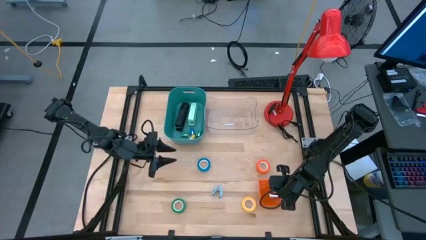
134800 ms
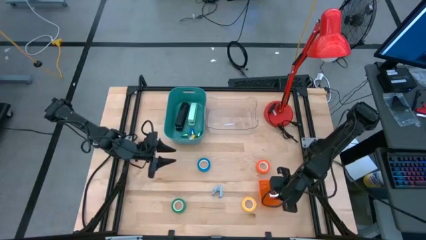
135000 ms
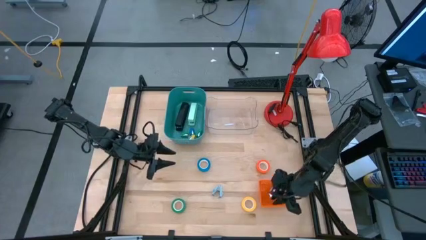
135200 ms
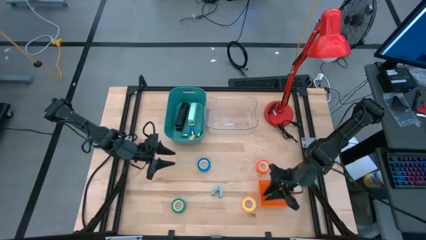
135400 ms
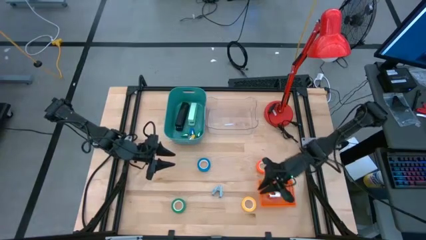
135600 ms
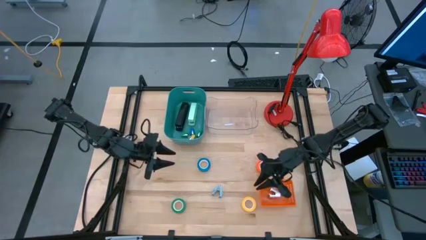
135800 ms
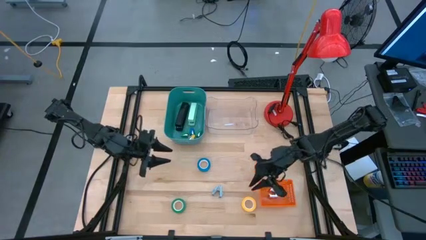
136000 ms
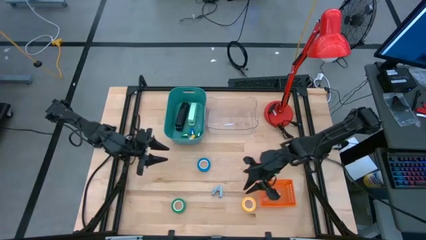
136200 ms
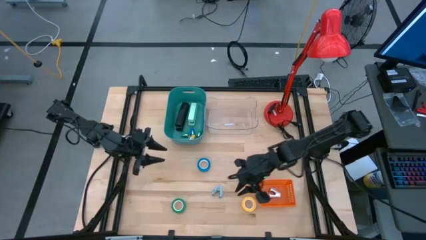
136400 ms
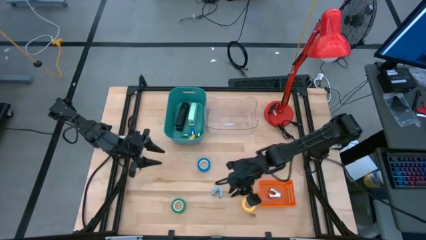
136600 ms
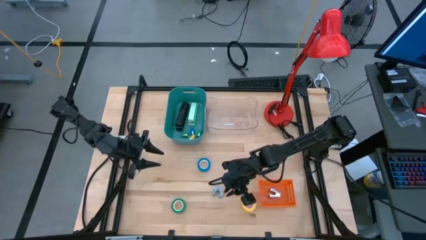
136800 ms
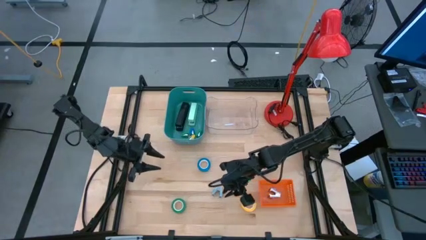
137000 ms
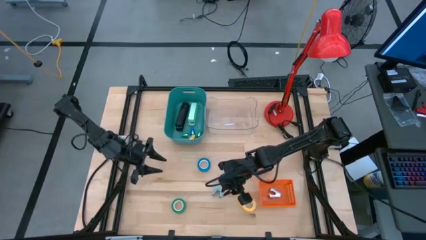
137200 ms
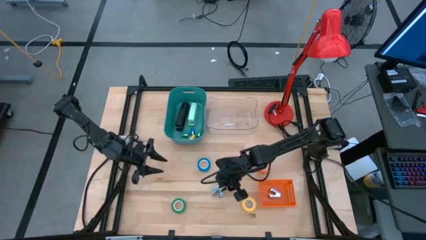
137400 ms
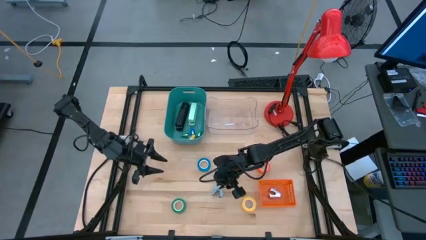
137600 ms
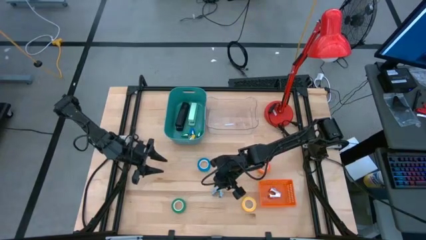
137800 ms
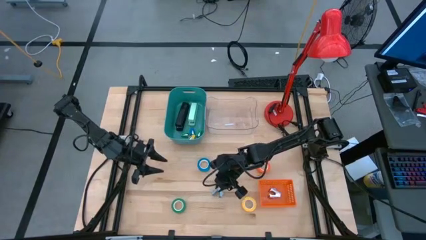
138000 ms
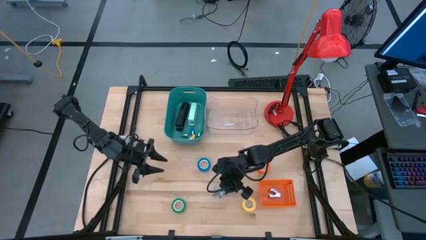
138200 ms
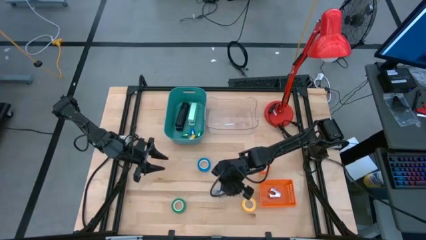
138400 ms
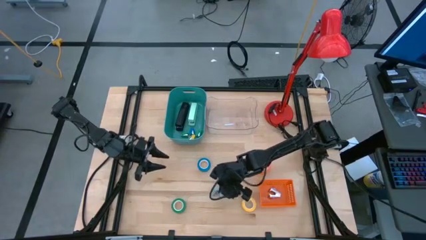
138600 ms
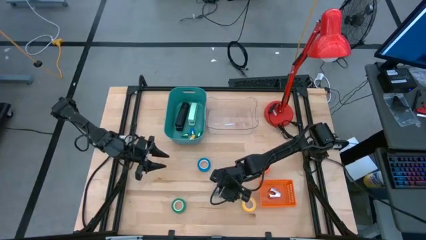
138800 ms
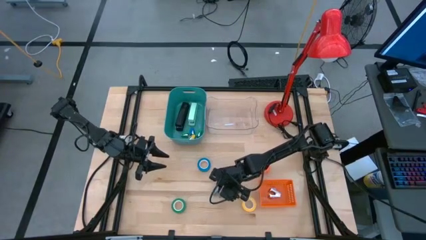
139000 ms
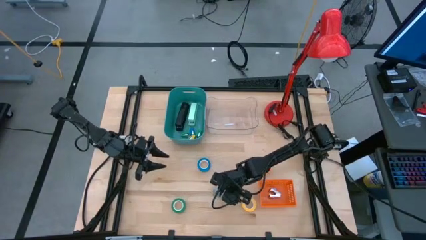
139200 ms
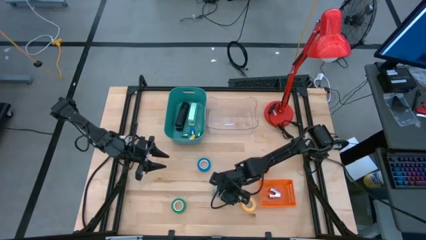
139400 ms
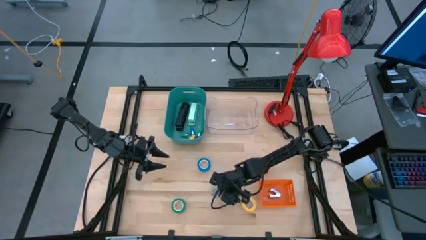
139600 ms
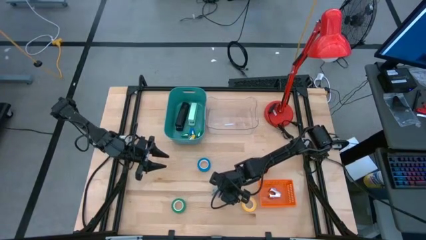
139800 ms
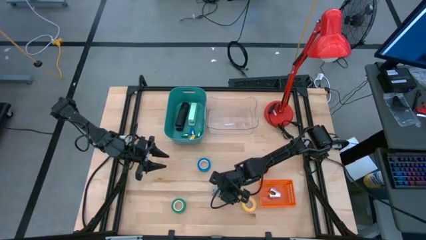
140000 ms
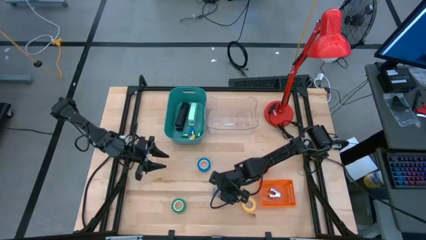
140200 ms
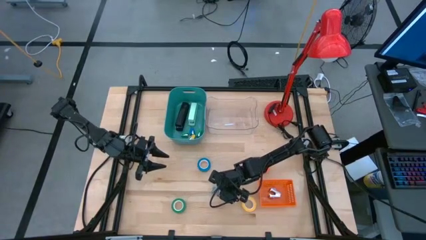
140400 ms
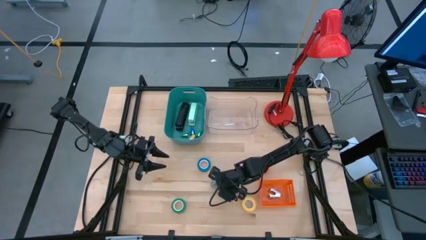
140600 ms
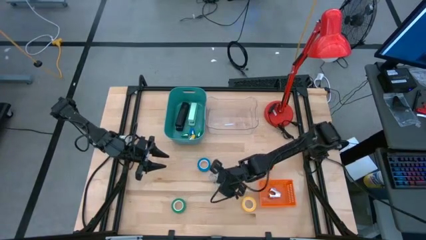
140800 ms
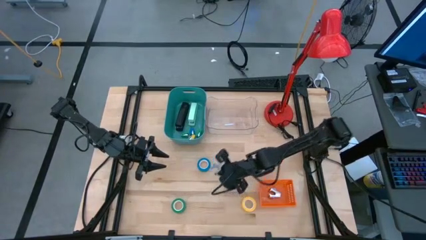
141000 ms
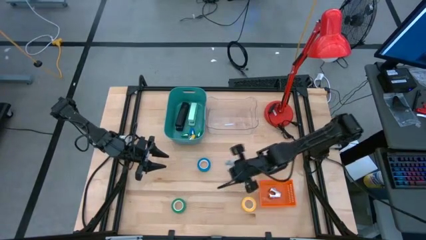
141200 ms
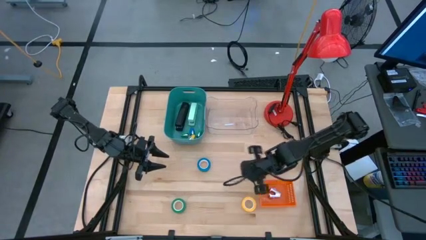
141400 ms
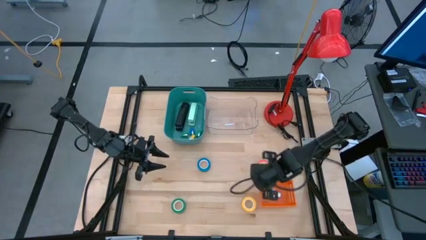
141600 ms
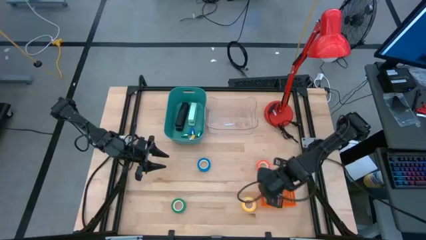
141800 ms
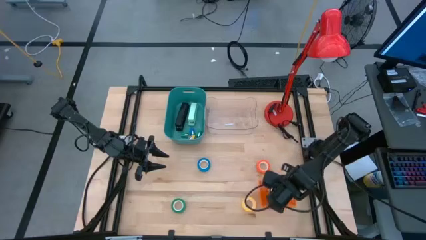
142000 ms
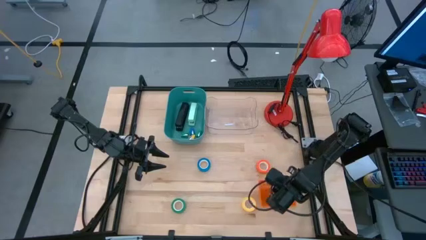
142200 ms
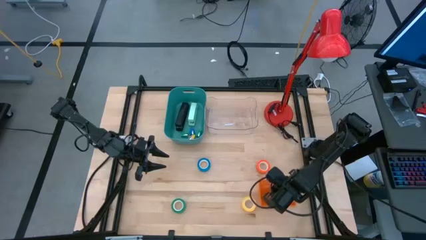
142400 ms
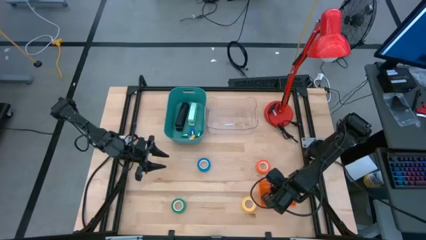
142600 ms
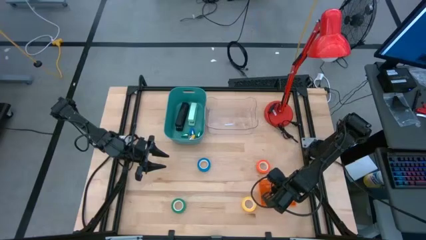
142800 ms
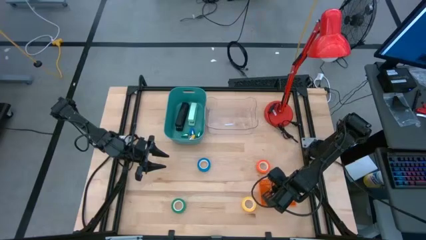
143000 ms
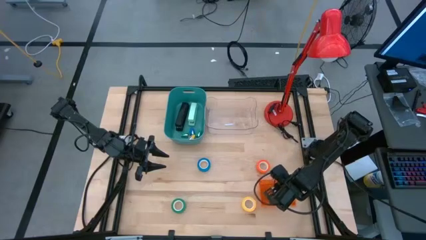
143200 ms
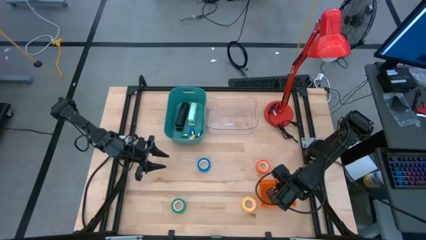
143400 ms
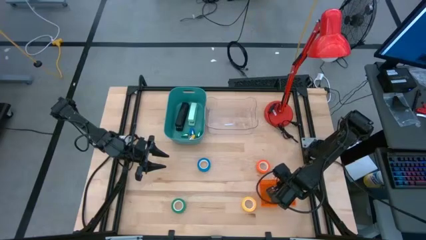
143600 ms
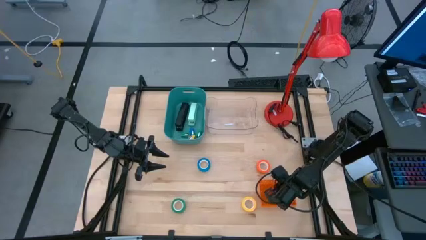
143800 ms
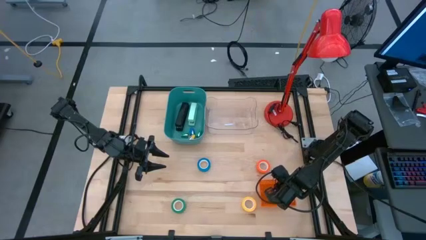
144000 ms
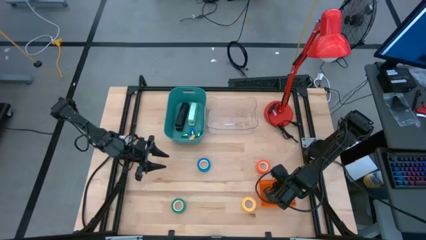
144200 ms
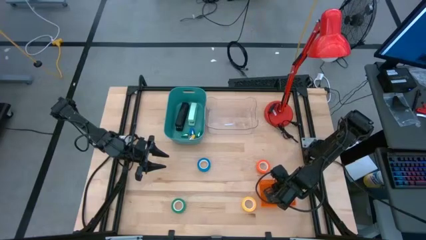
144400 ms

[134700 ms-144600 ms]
Task: Pick and place Stapler, Stapler remover, tape
Put the light blue staple remover into the orange bin

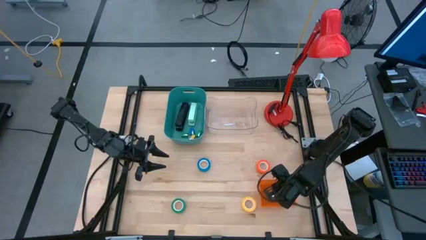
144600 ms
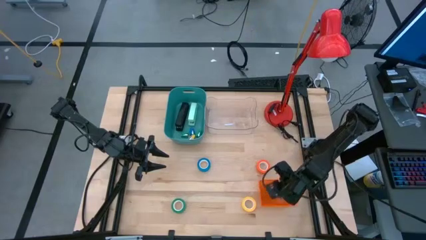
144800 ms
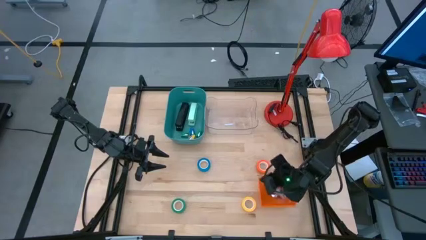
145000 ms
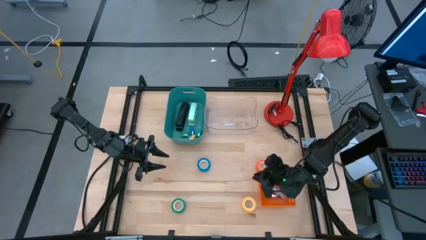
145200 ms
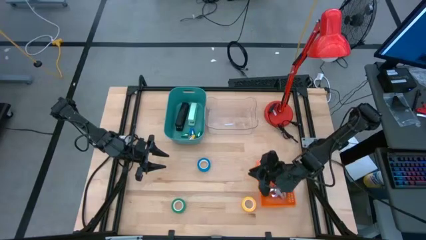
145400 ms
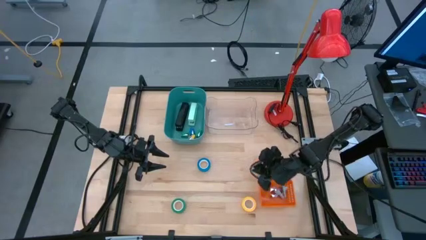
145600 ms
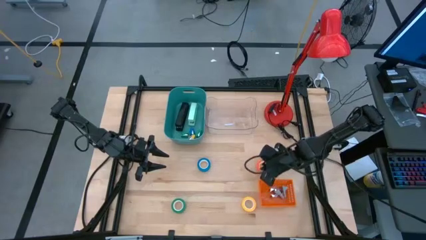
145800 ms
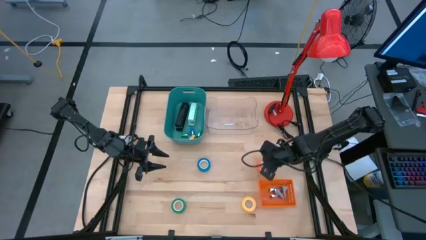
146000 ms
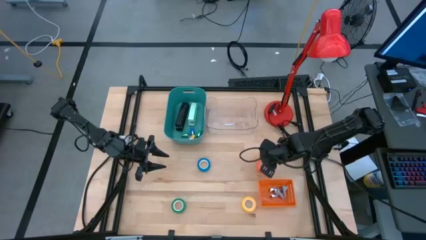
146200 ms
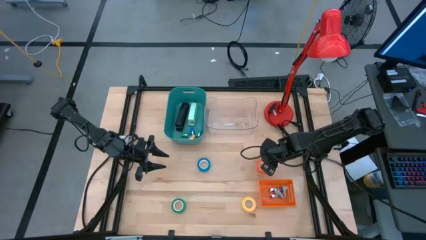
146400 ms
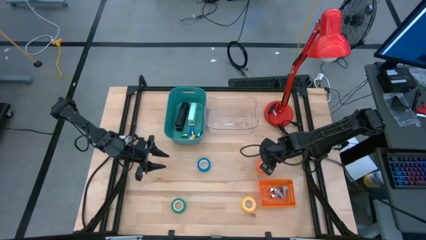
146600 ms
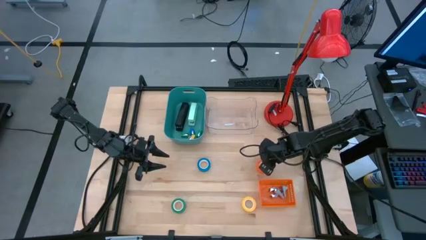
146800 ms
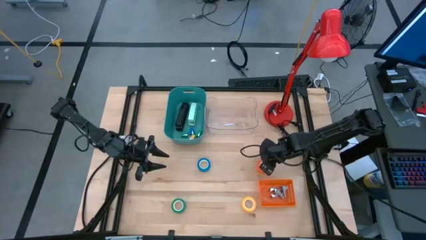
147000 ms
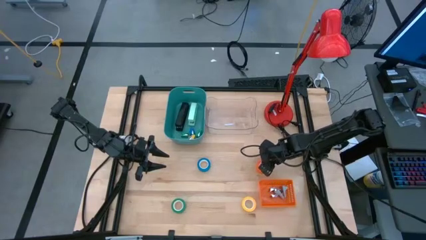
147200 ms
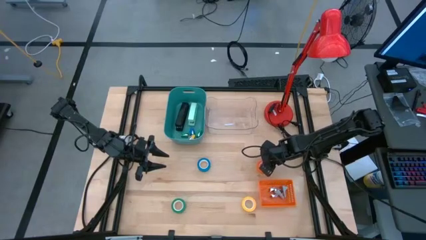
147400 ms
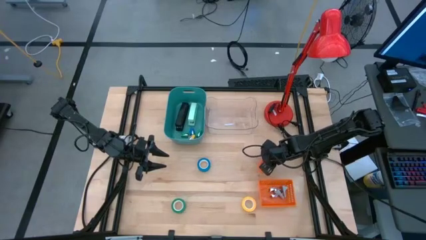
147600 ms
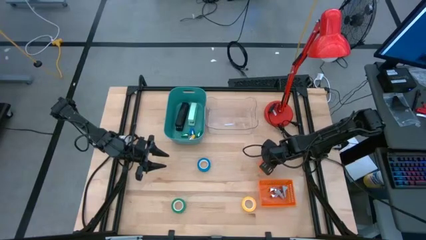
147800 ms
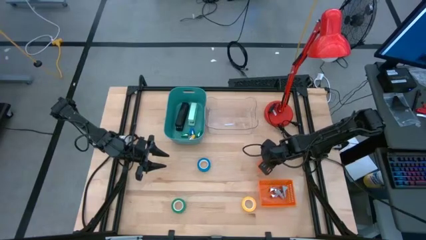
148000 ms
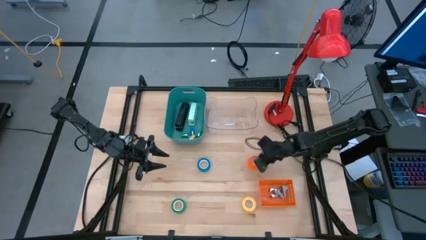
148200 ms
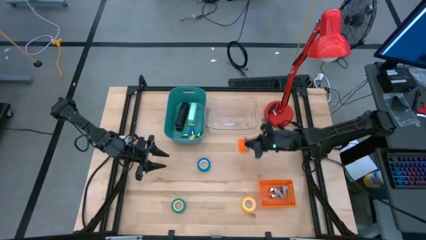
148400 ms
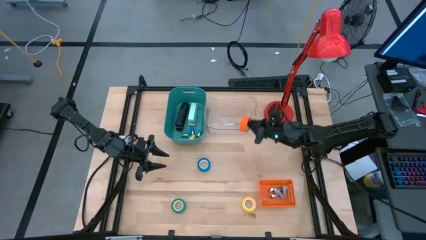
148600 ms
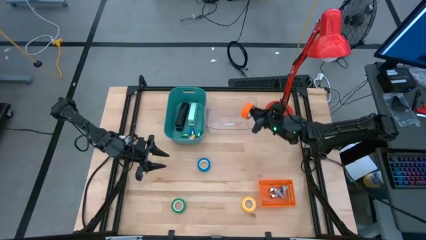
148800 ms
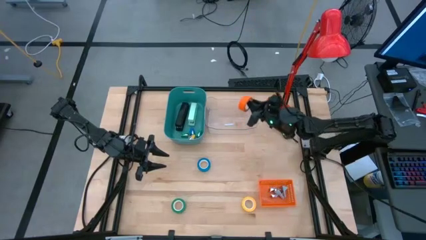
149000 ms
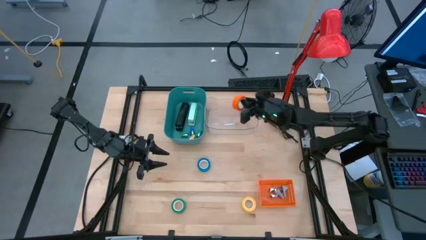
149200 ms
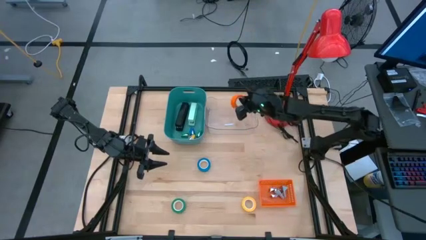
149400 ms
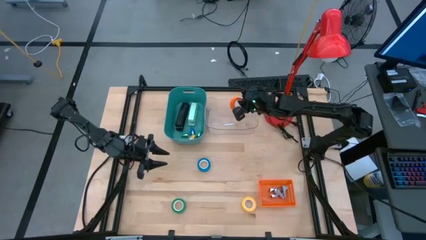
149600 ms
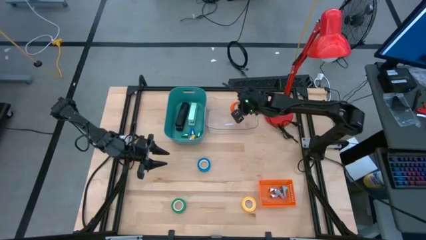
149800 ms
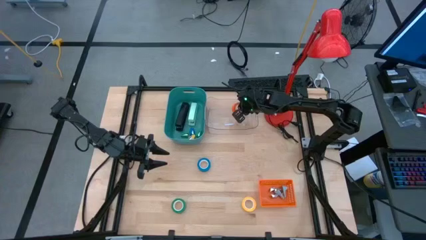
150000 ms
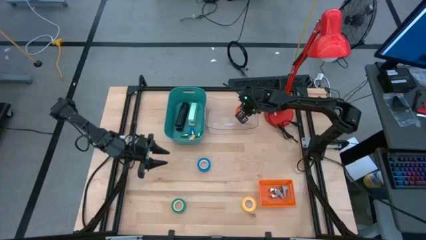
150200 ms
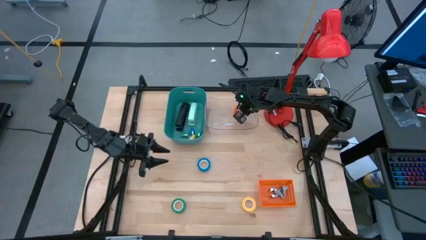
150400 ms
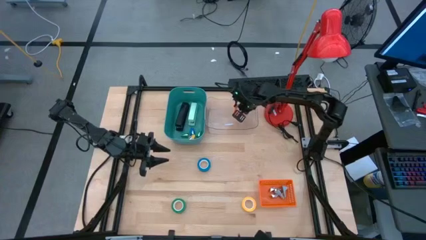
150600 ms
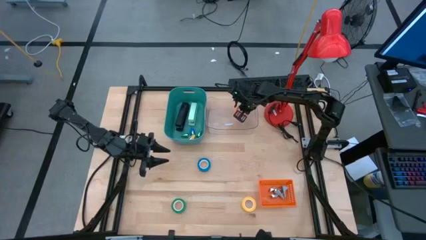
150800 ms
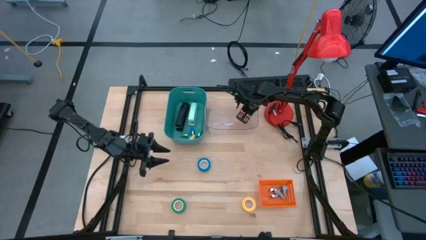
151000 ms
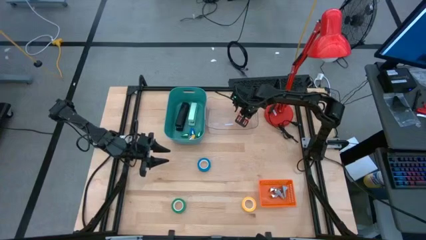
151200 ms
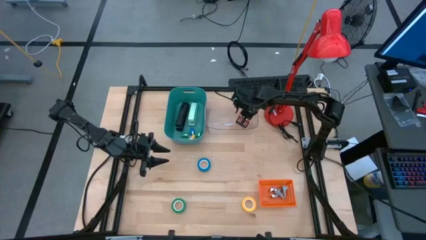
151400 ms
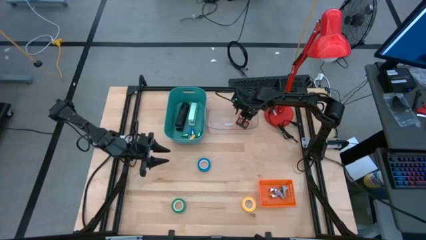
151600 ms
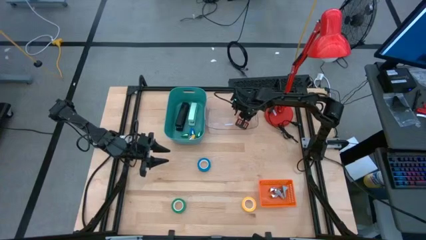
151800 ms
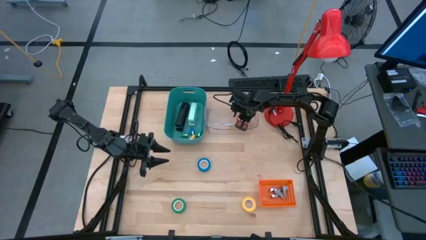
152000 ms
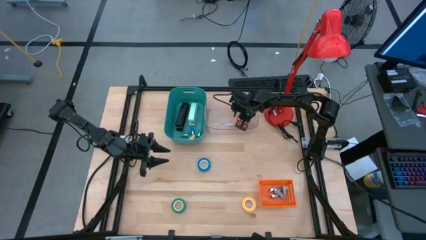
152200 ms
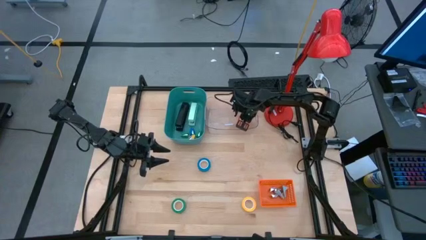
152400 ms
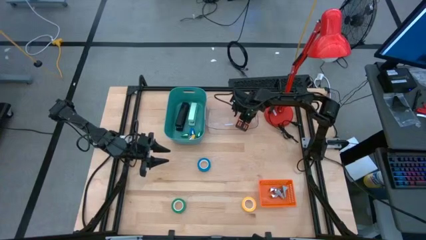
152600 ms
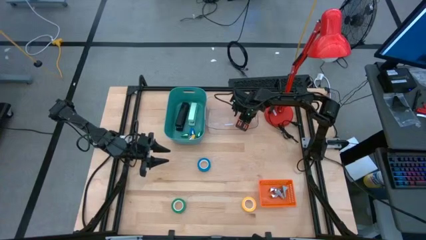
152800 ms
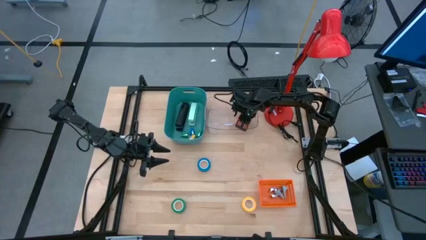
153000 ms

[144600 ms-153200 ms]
Put the orange tape into the transparent bin
